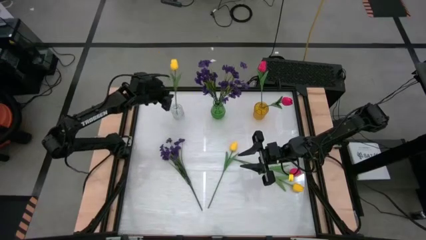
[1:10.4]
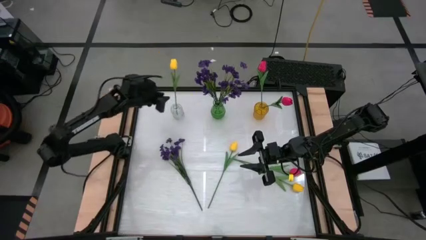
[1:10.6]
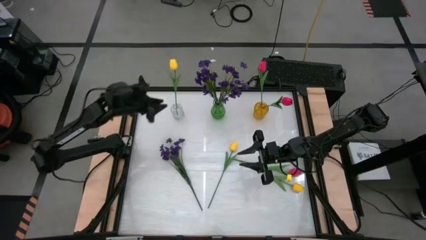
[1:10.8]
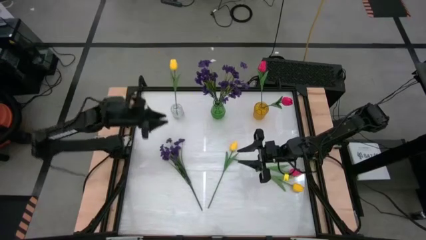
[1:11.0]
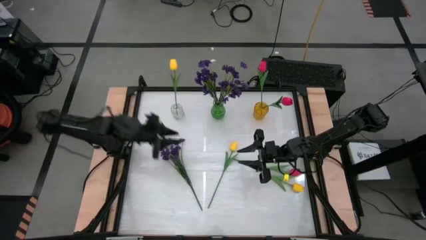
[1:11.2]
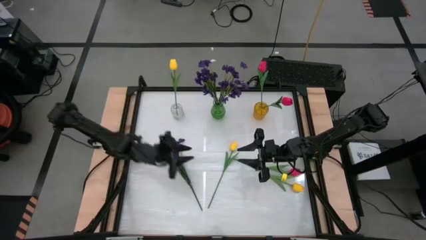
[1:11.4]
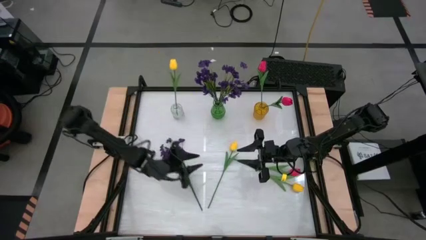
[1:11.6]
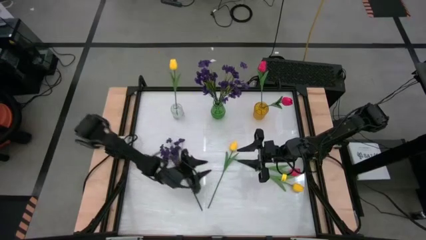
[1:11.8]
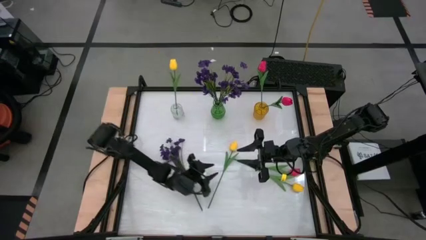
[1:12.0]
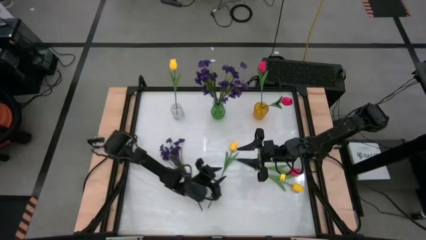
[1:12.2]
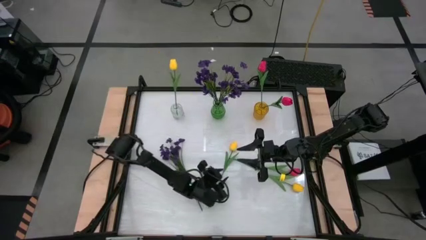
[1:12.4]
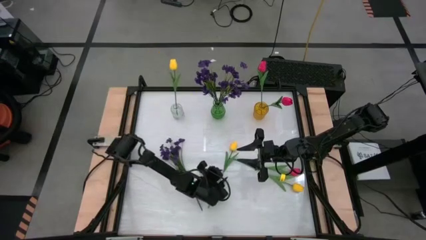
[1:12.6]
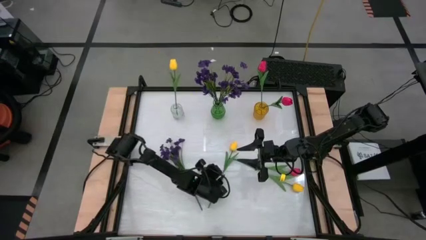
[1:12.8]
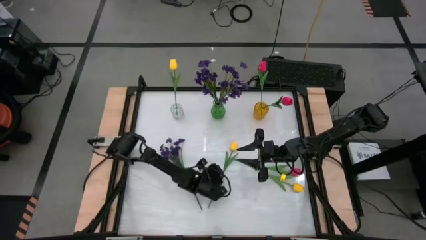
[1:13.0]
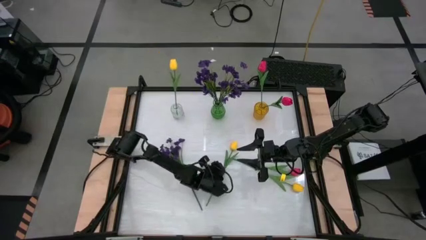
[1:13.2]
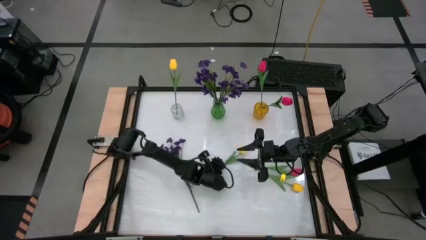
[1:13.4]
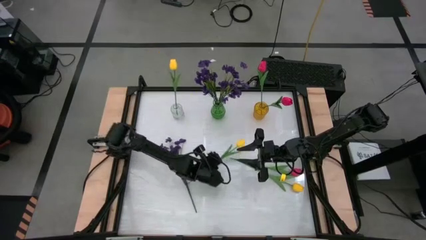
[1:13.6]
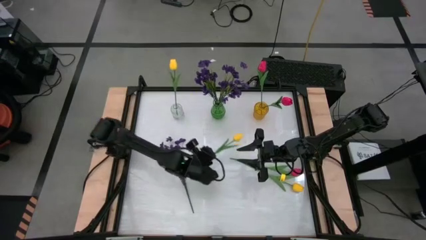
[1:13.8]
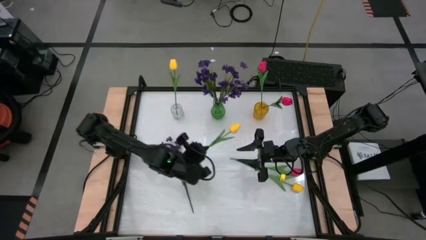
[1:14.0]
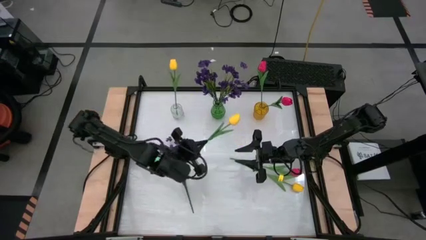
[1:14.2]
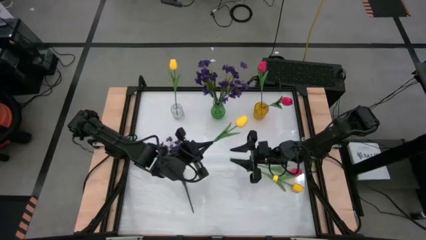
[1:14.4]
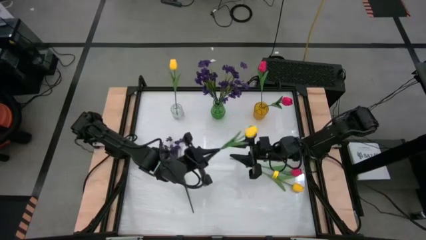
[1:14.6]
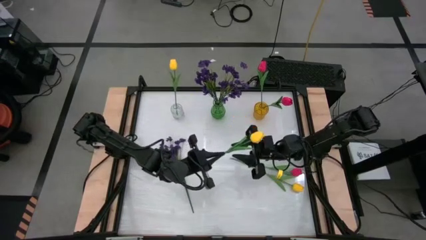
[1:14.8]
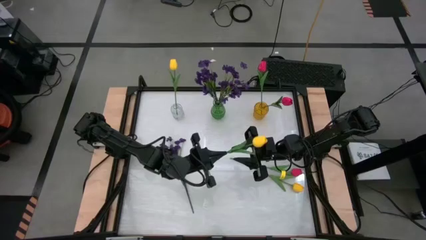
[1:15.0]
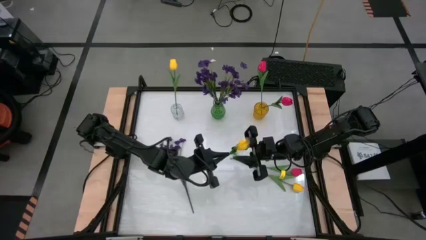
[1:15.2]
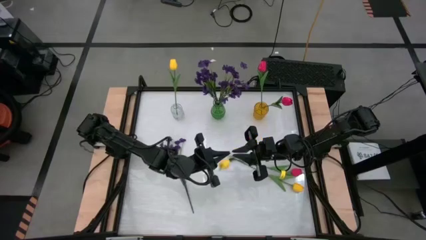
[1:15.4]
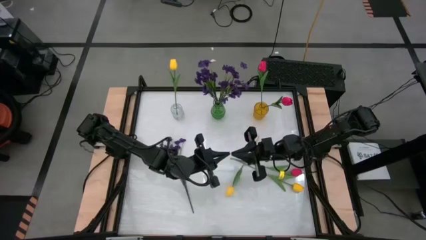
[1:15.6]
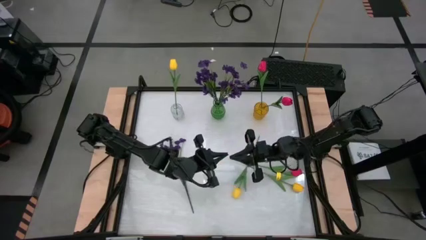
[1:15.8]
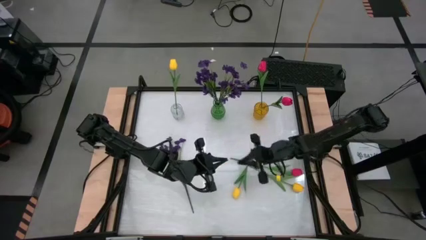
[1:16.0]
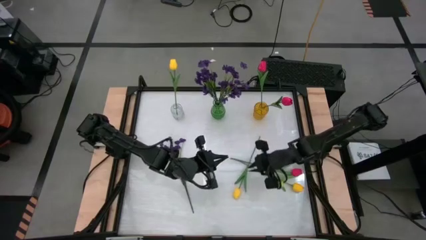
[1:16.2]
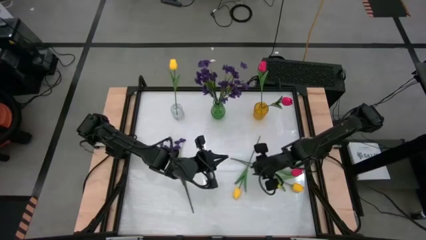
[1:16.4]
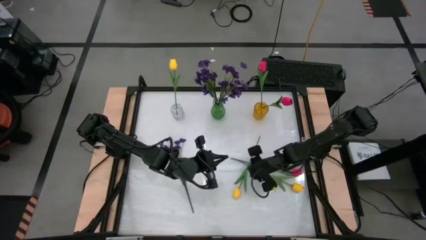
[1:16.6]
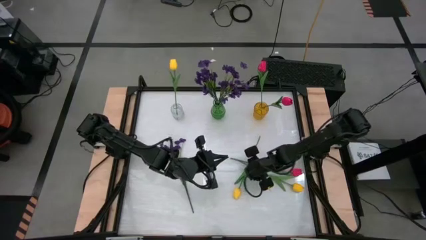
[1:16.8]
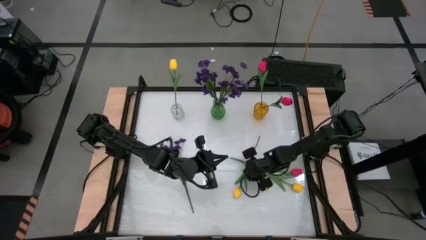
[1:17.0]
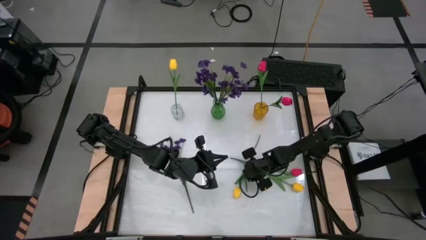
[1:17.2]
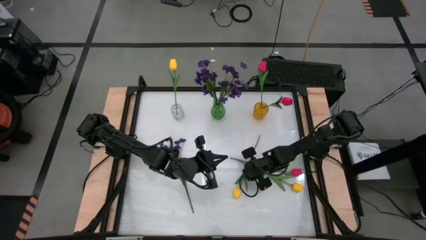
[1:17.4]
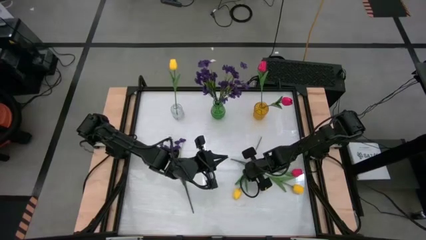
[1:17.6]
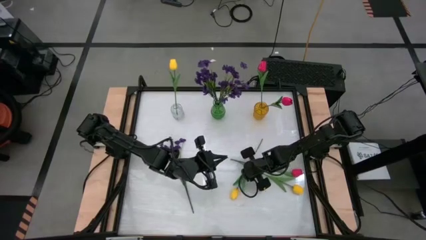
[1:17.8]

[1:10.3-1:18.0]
Task: Sort flowers into vase by color
Put the left yellow flower into the transparent vase

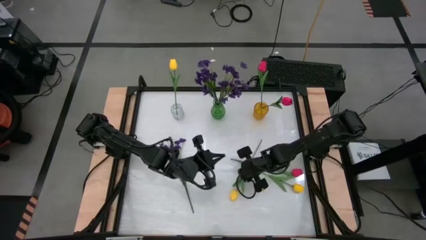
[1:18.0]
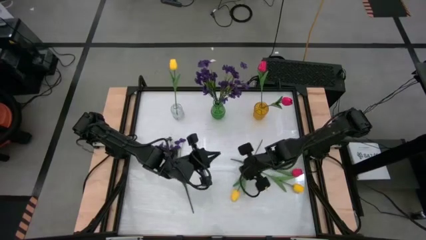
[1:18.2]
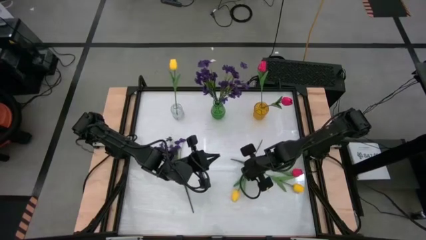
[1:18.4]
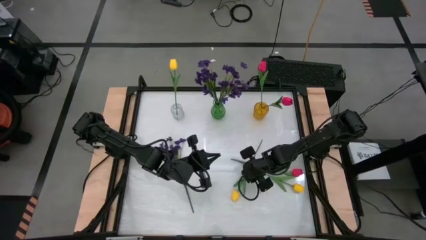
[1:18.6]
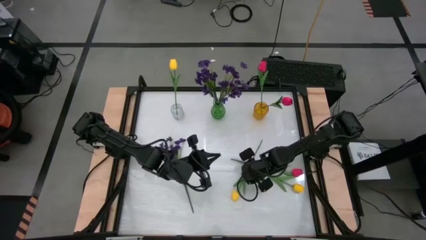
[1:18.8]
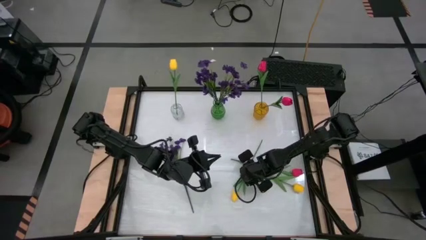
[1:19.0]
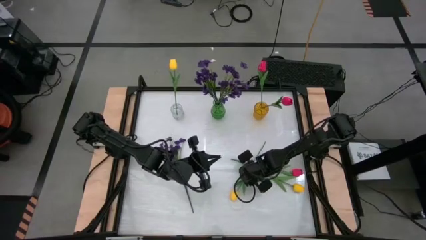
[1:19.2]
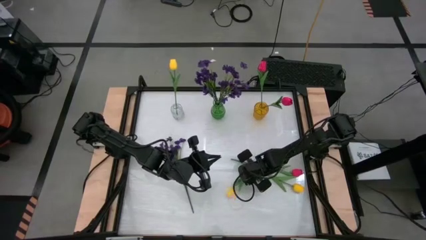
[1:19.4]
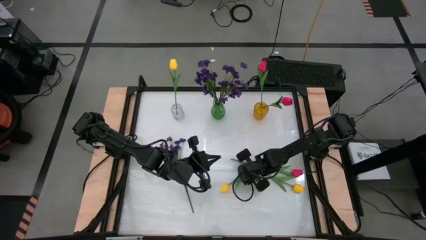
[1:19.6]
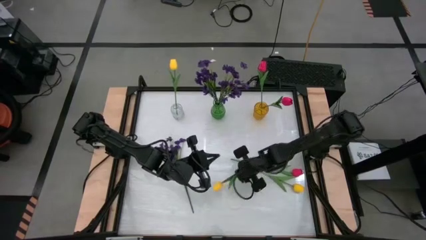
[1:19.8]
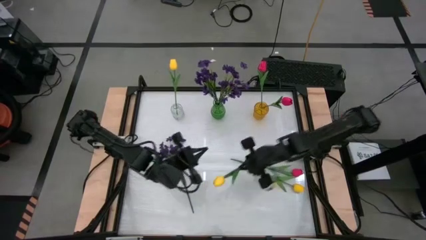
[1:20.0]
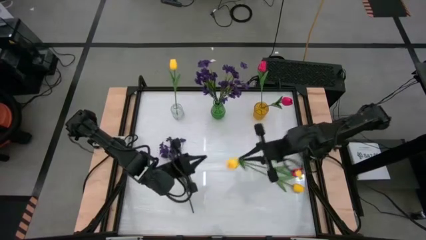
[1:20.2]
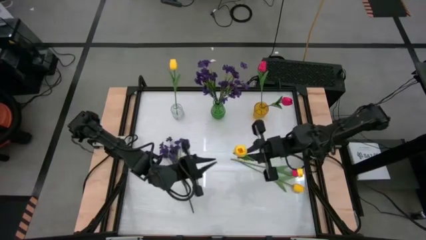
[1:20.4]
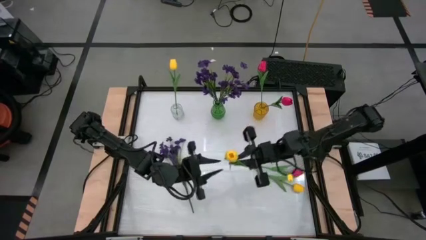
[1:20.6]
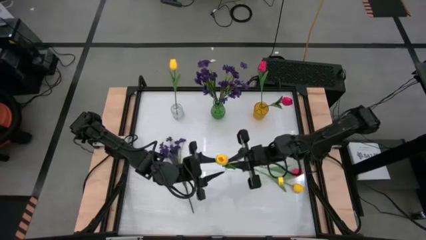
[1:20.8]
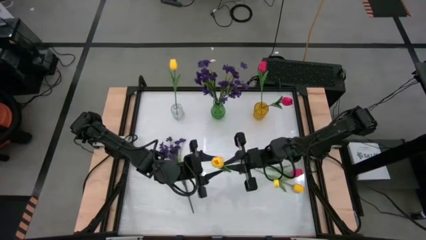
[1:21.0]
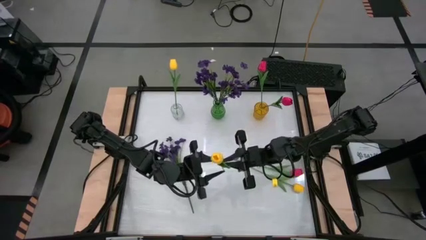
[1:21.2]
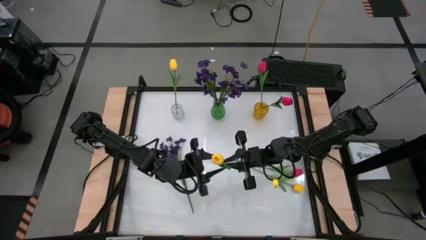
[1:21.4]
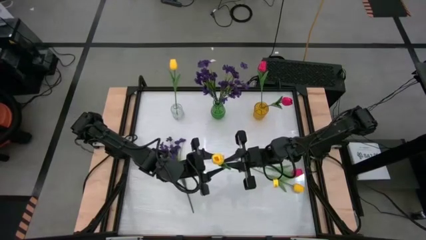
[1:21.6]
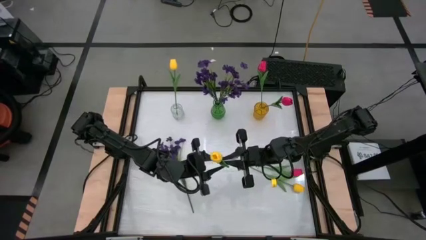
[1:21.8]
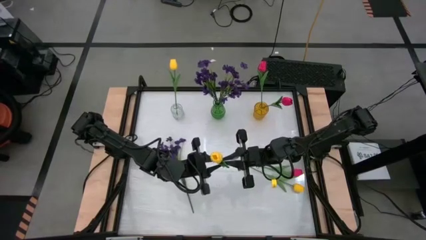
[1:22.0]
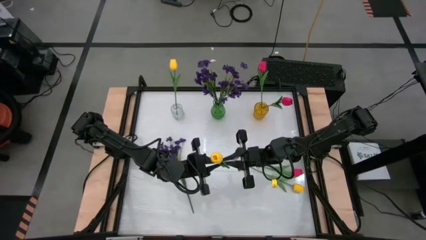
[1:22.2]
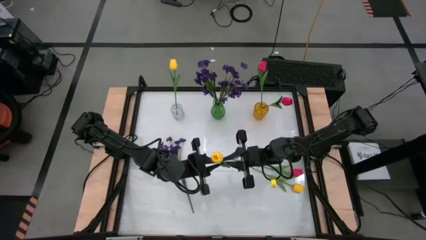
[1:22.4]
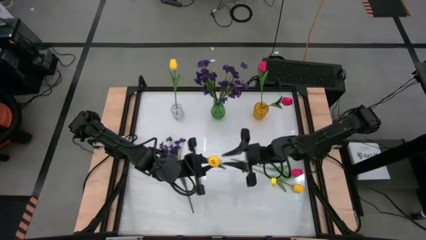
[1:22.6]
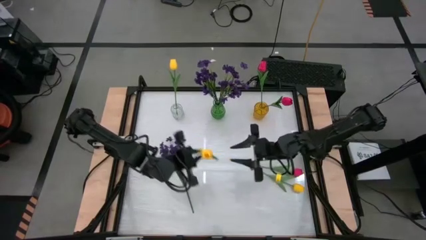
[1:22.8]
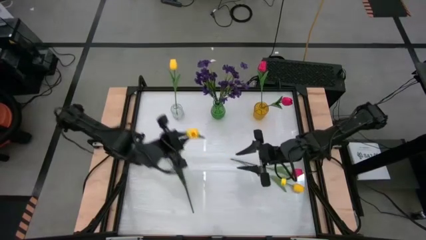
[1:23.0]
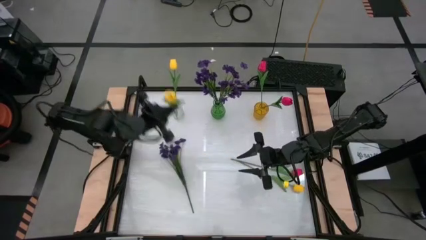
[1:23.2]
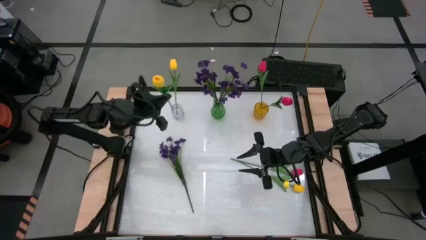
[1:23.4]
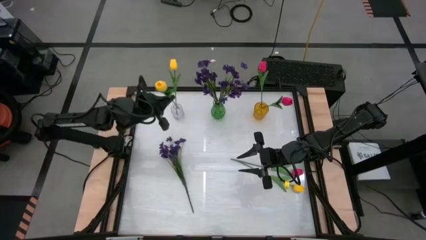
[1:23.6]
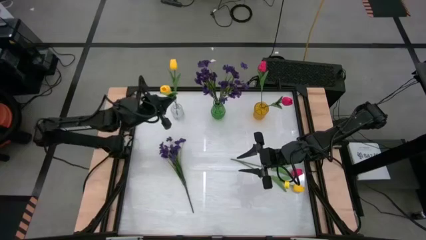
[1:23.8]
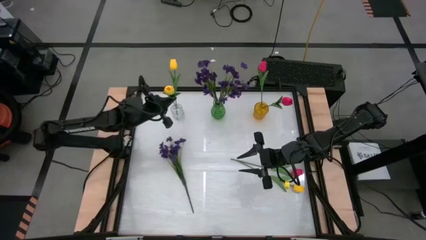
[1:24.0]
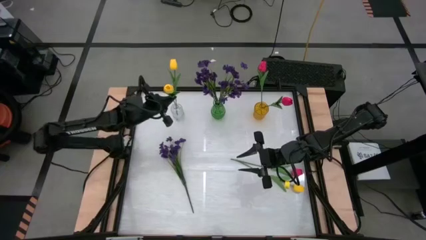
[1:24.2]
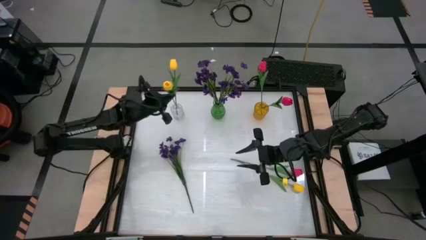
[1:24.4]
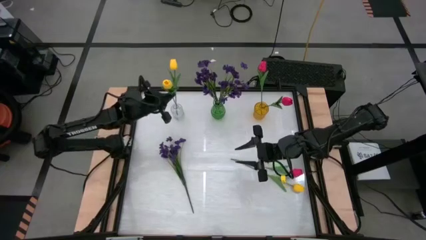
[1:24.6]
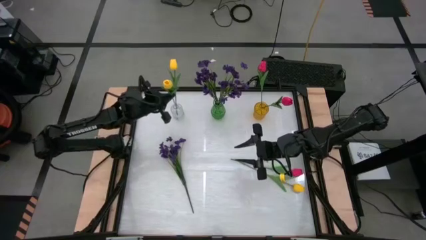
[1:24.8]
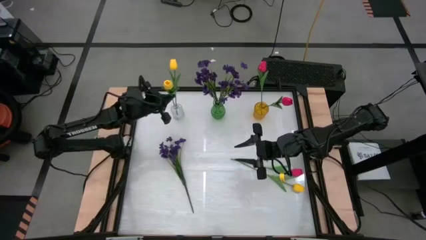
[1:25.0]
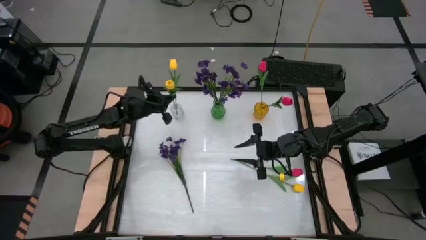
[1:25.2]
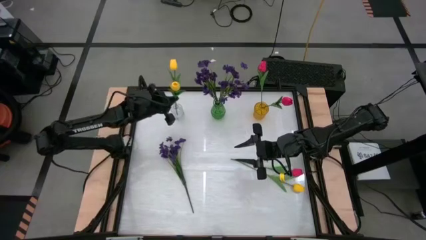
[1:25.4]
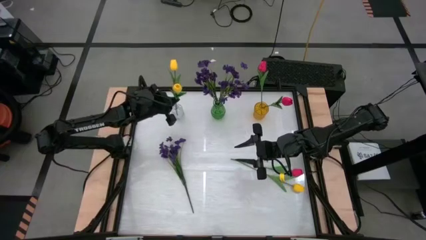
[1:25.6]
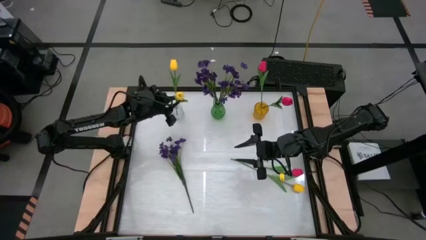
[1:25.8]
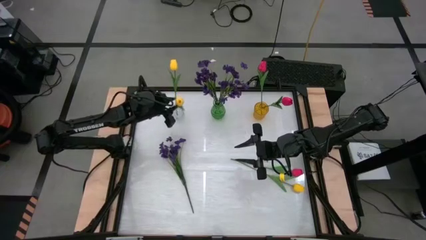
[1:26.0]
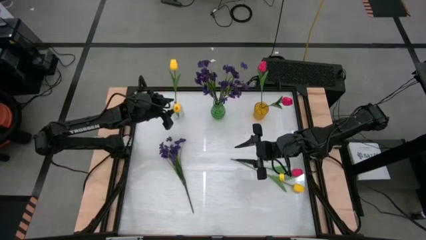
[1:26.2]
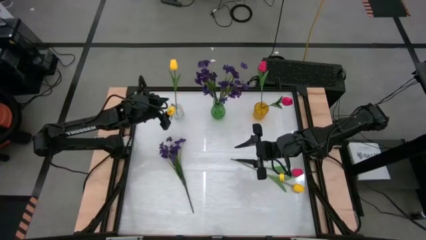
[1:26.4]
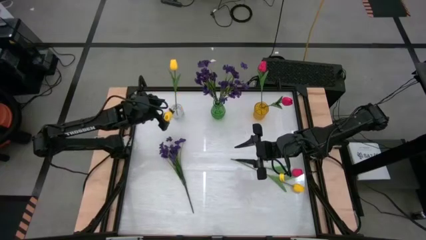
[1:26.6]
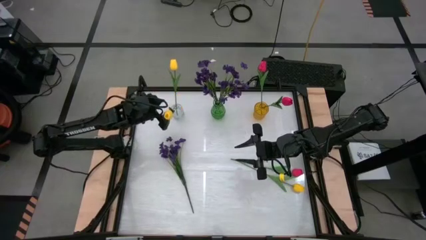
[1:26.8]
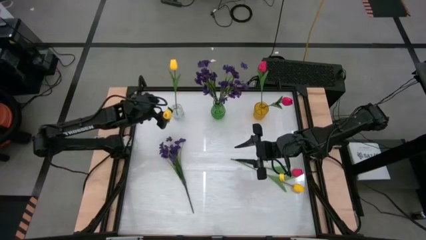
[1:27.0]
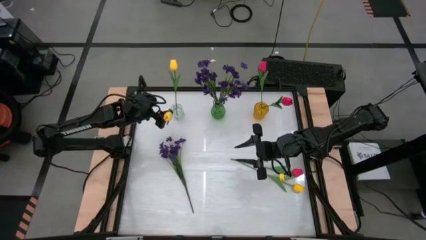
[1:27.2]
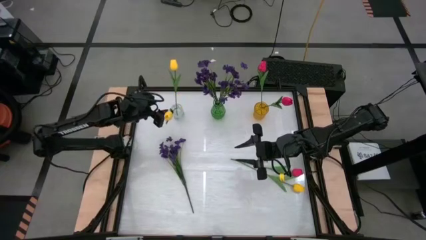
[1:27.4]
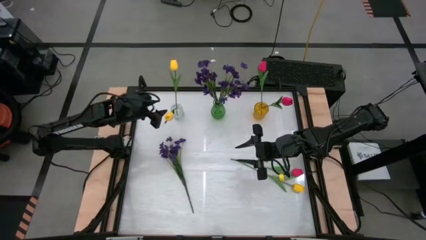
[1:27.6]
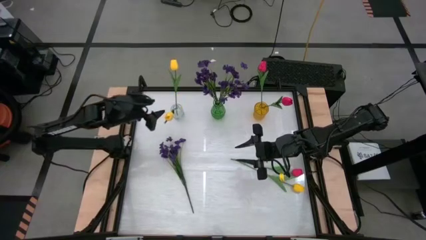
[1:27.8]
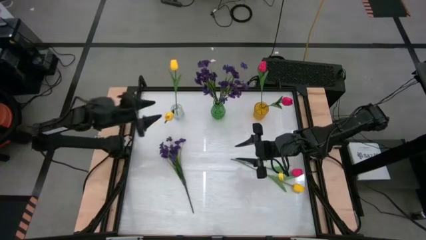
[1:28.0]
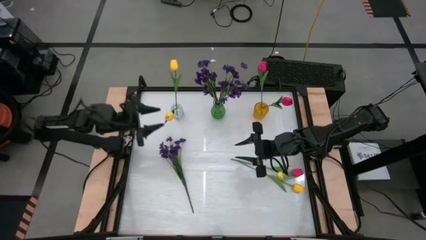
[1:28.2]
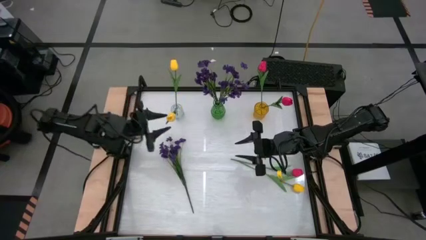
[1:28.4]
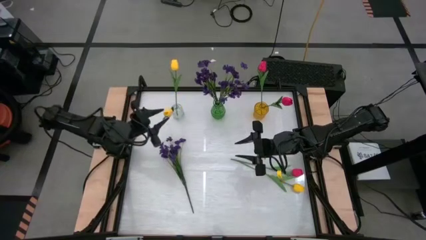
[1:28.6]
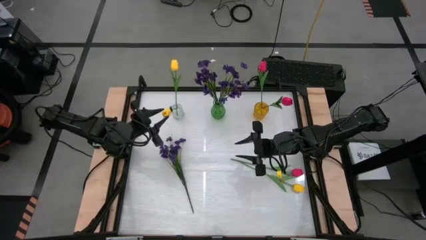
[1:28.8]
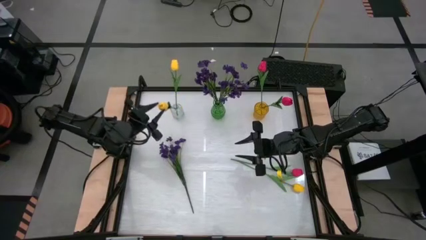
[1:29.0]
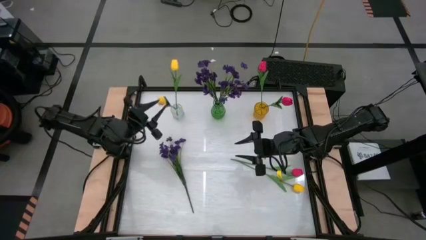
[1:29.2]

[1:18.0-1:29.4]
Put the left yellow flower into the transparent vase
